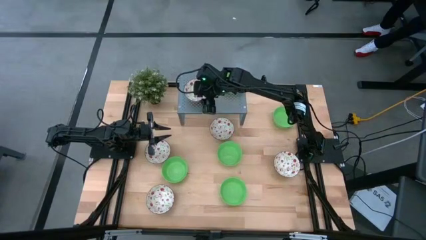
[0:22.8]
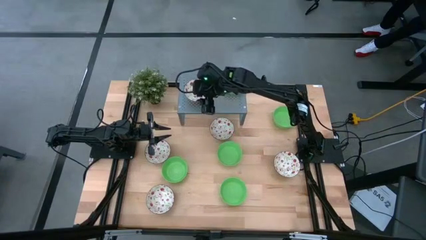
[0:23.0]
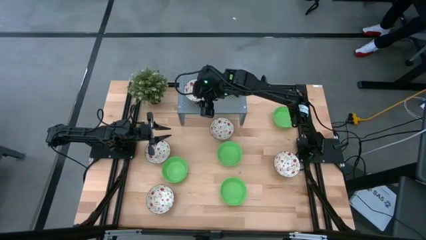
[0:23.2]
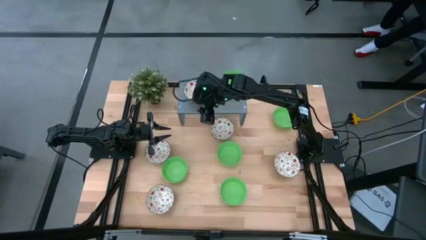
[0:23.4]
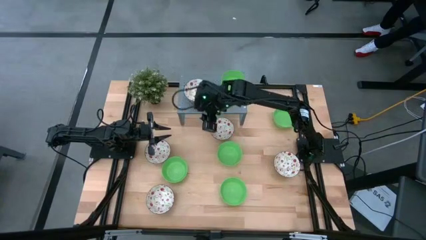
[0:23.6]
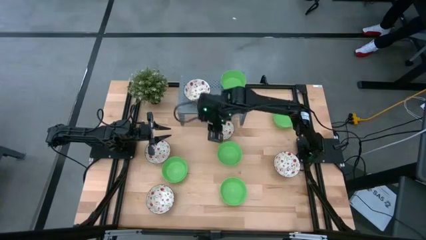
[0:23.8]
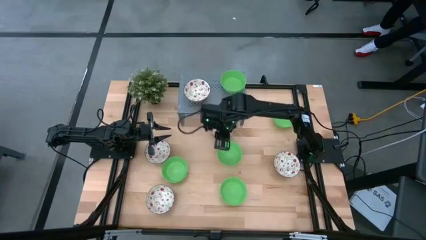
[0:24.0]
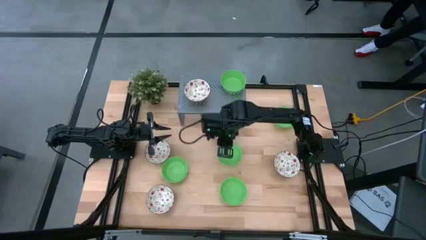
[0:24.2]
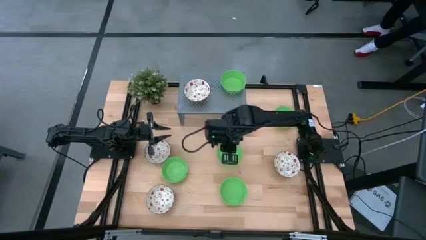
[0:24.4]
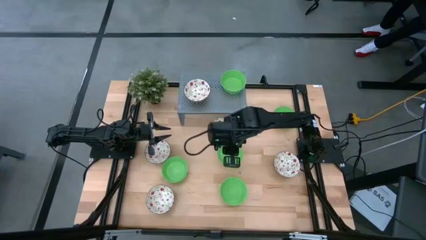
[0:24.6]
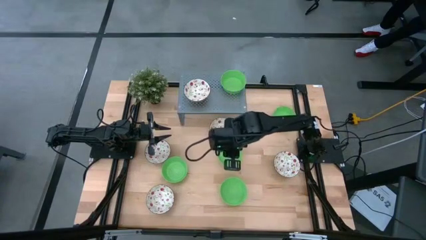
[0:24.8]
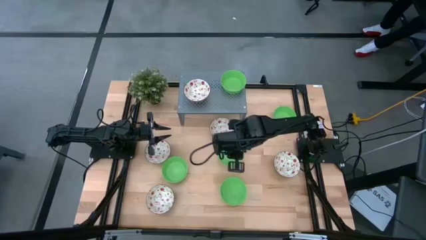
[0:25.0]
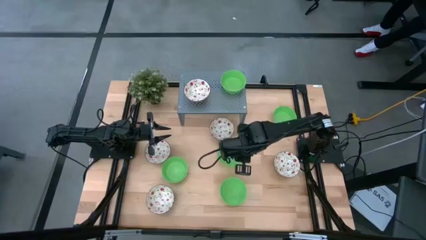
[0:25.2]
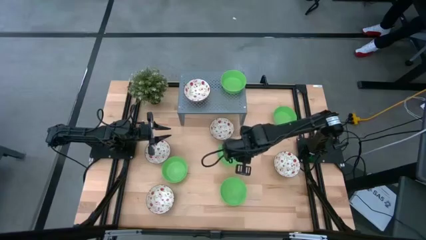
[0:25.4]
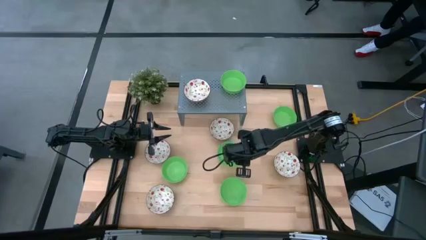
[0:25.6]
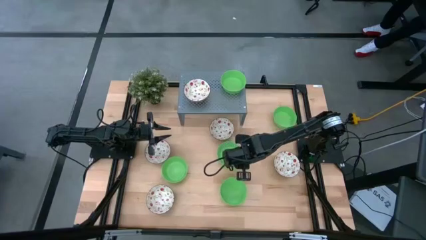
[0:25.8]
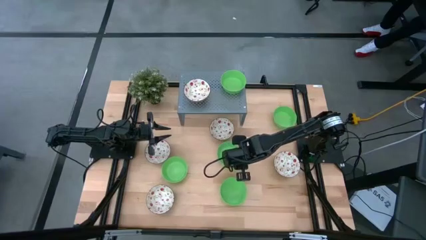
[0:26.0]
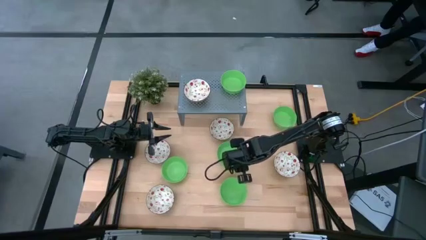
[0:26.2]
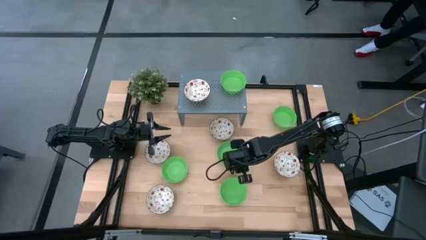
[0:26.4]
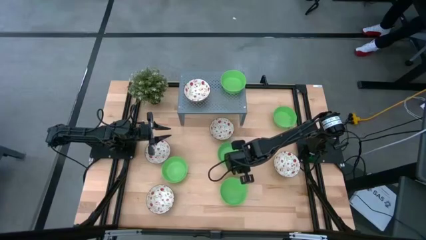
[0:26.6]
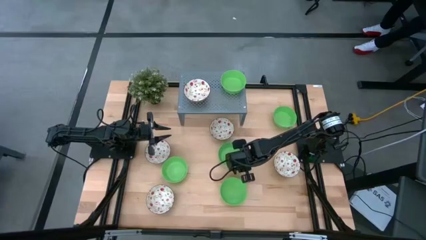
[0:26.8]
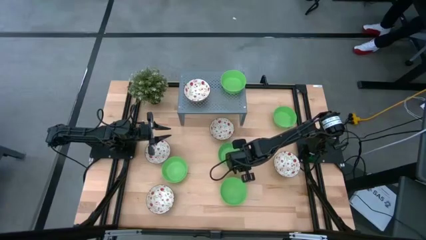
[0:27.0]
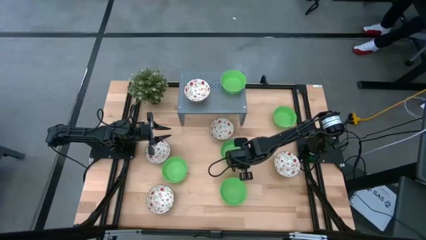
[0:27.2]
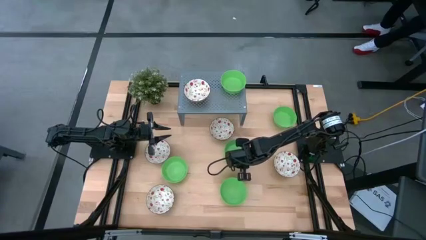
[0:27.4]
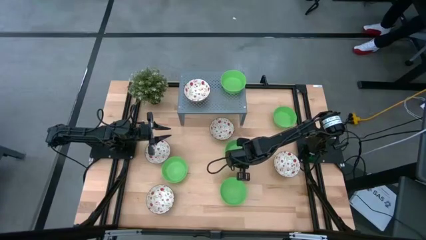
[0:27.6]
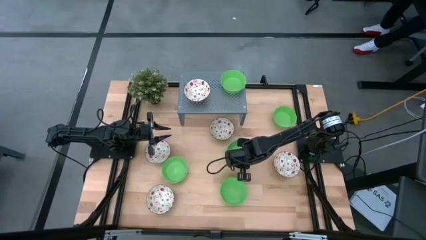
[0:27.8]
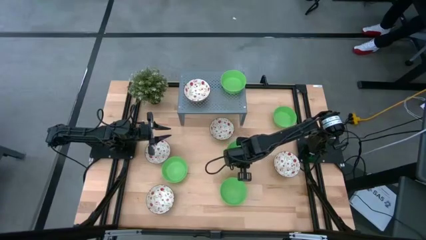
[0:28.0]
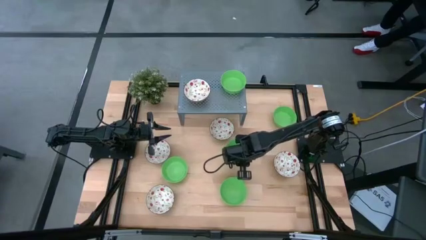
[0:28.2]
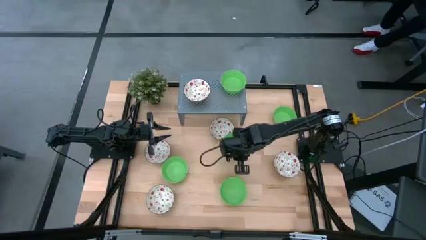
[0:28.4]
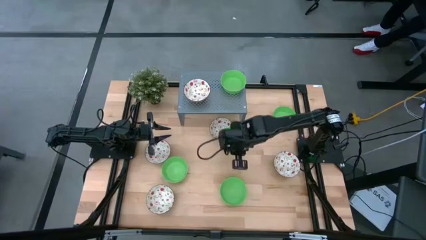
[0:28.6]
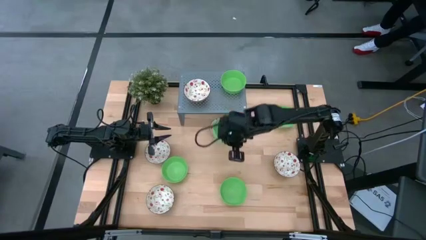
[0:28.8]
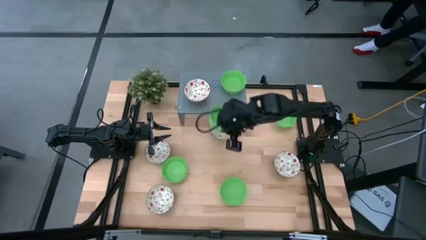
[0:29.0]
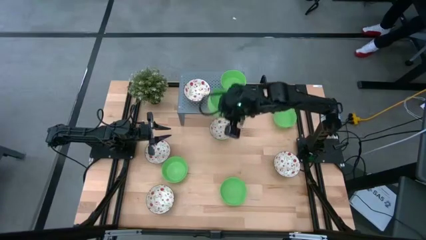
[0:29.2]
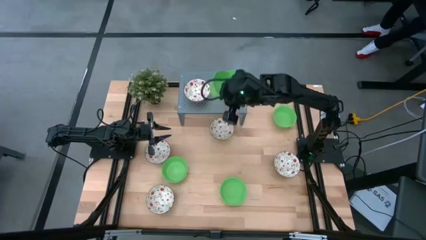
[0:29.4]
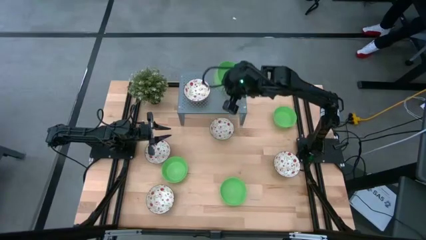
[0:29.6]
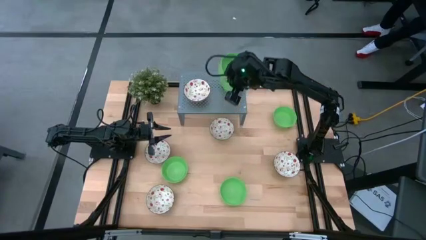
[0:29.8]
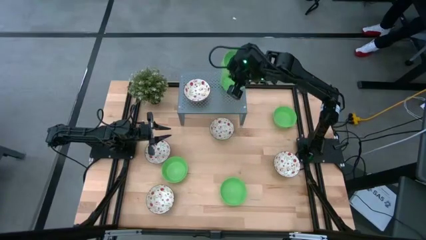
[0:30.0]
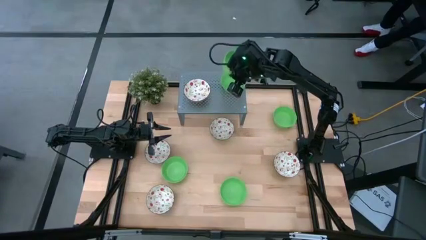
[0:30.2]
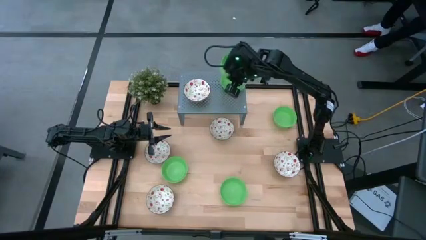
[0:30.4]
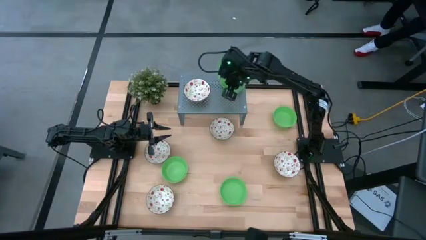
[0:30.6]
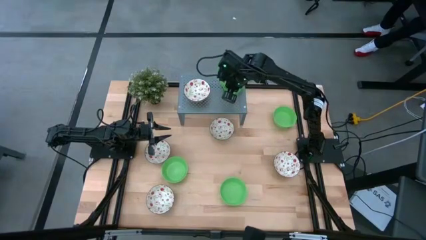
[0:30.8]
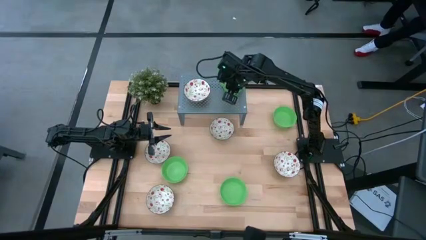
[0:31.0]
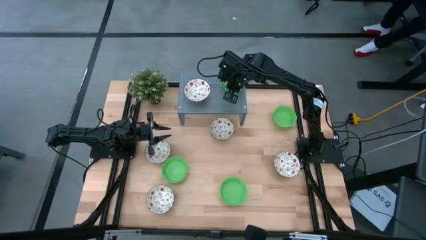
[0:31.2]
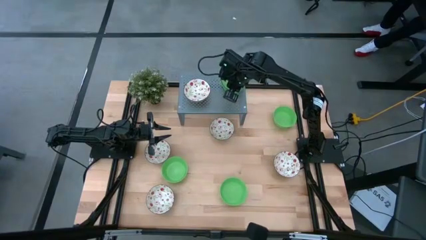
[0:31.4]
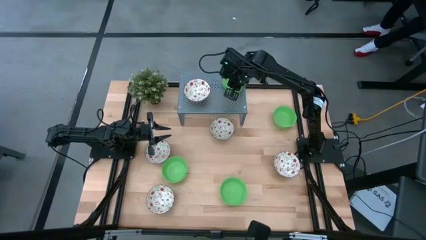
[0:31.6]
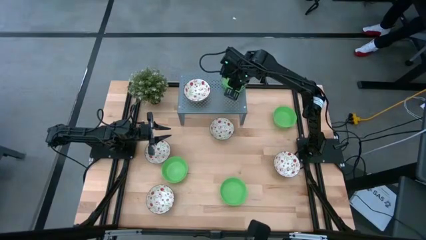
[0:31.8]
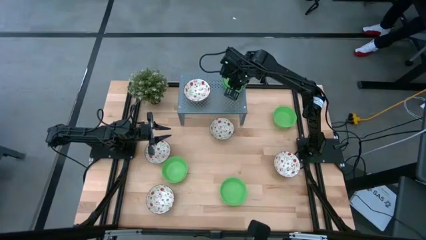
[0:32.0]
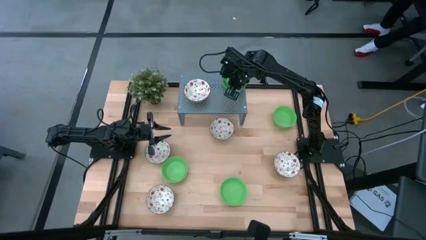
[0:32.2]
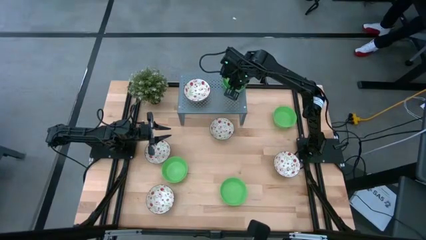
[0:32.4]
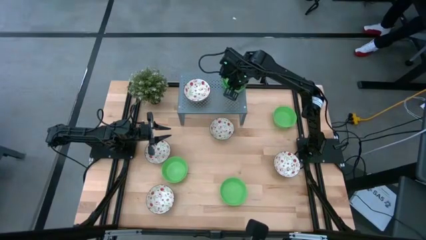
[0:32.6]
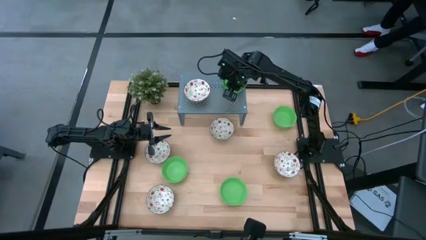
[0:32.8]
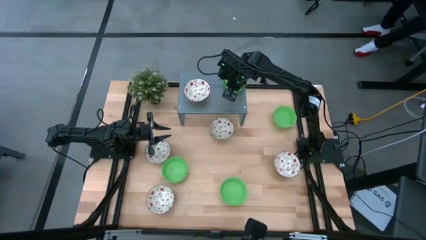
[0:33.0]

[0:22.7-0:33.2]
Task: Pick & Place Mini bowls
Stack the green bowl on the green bowl
